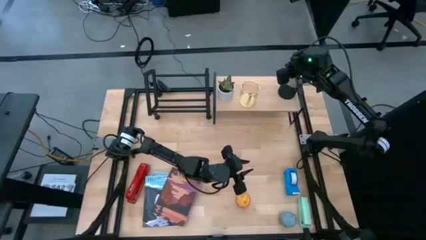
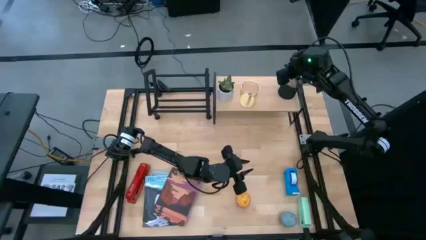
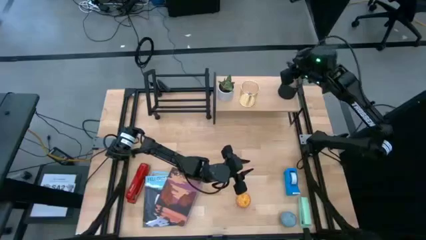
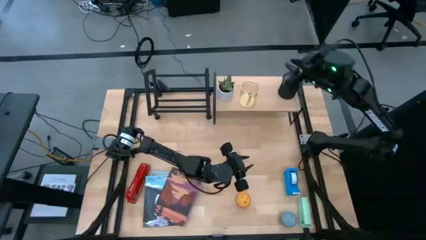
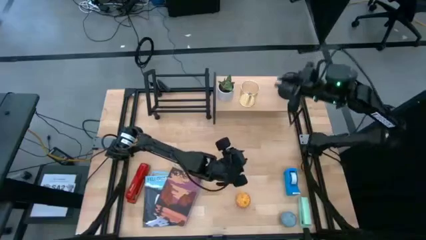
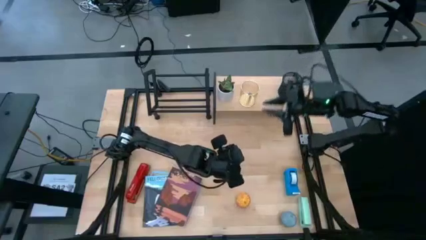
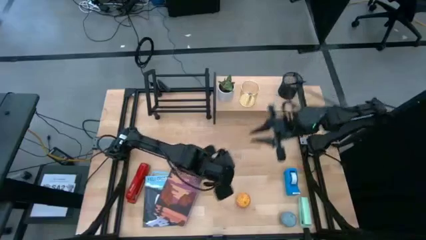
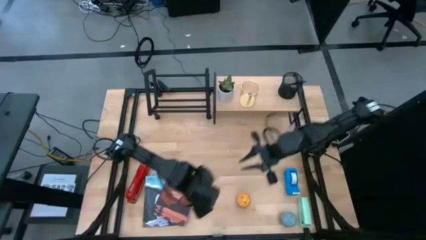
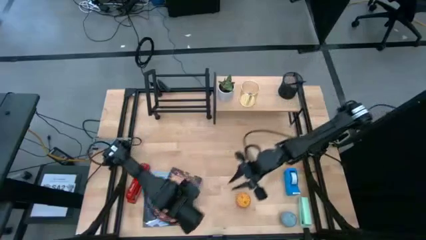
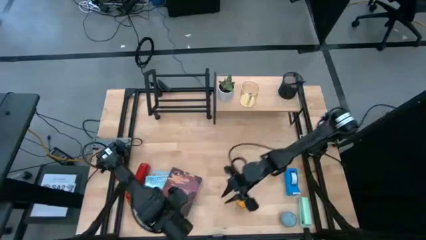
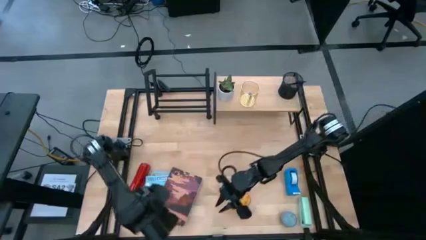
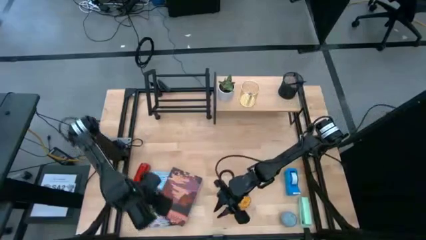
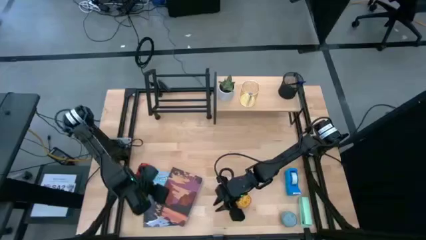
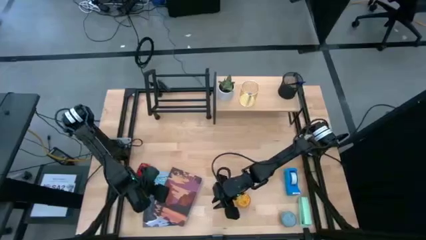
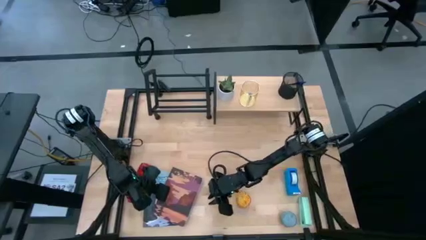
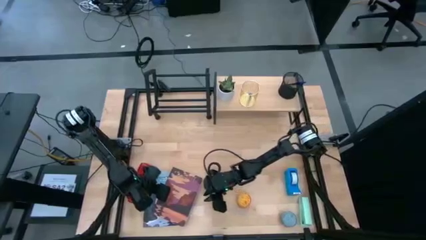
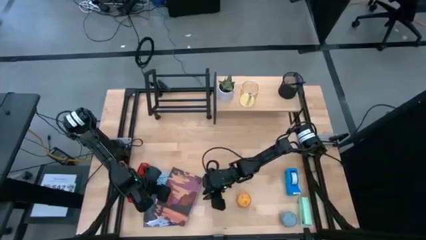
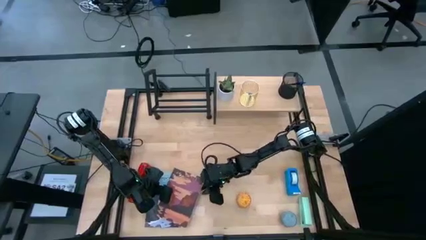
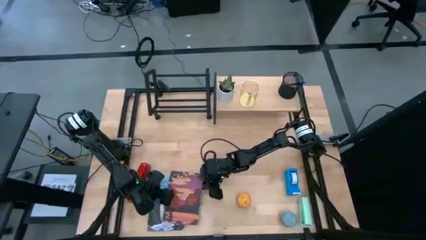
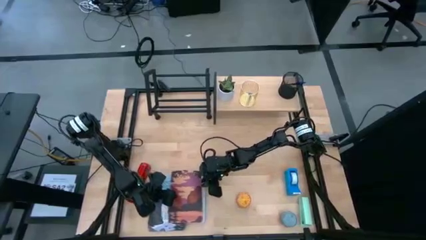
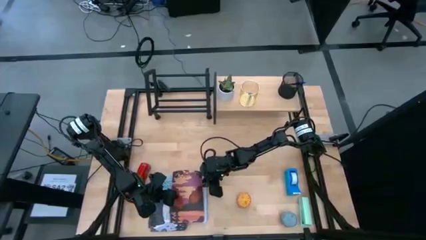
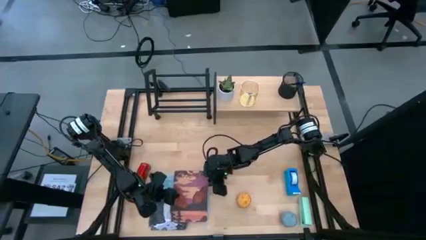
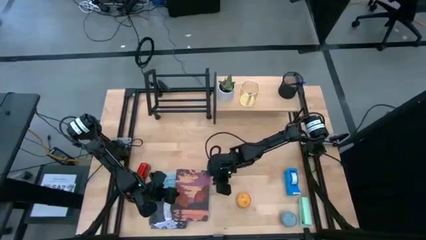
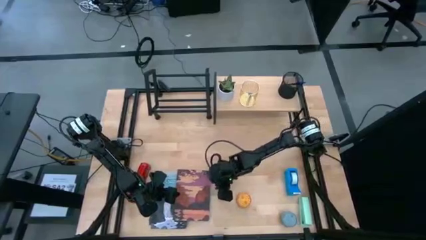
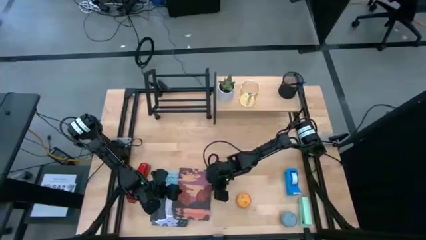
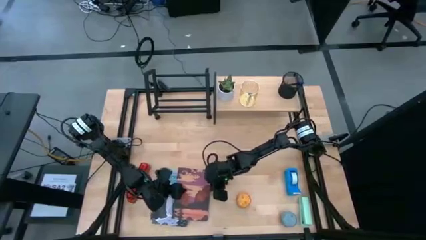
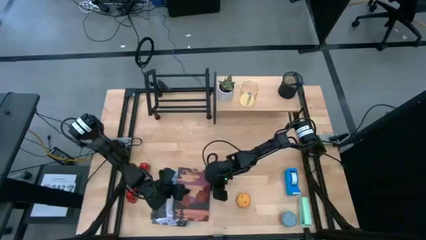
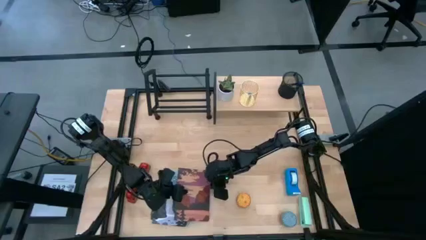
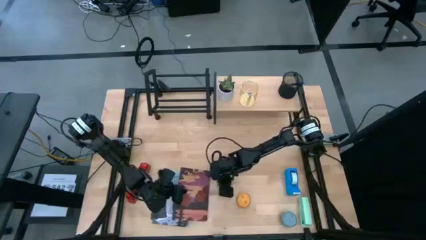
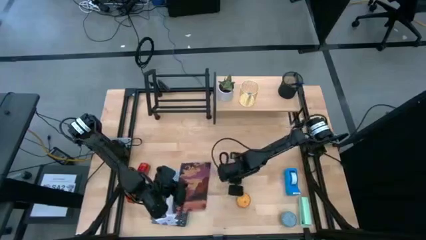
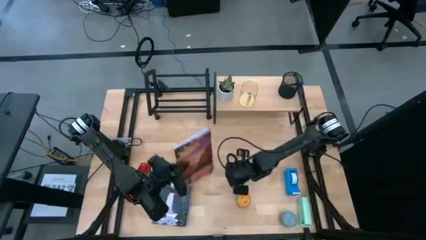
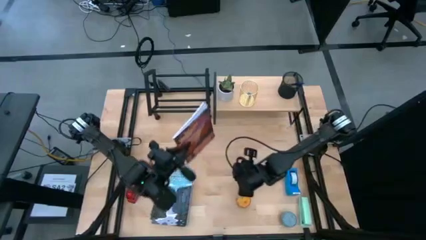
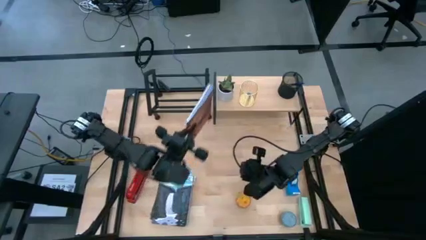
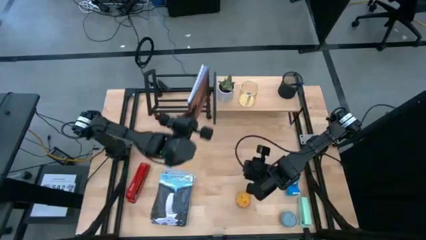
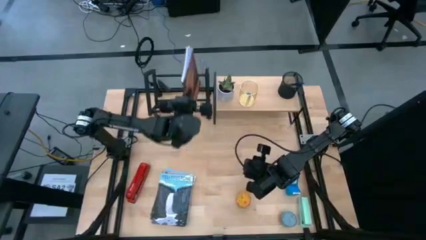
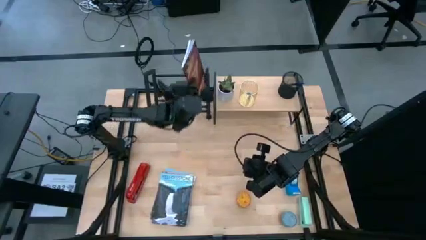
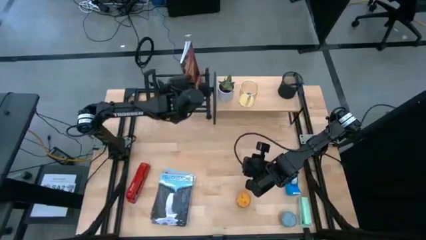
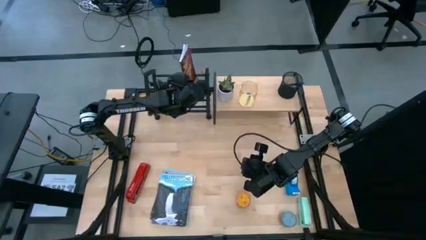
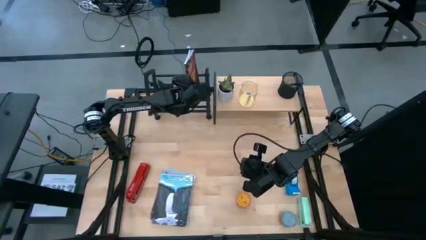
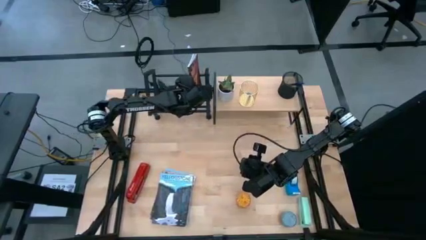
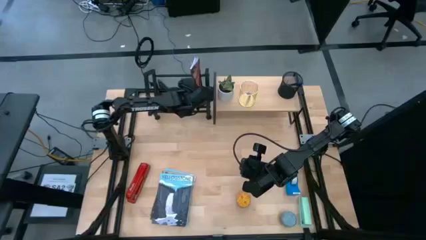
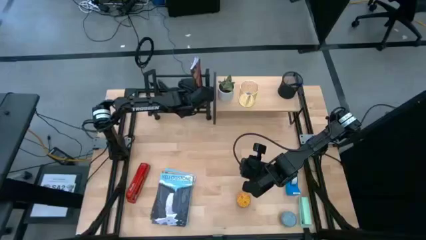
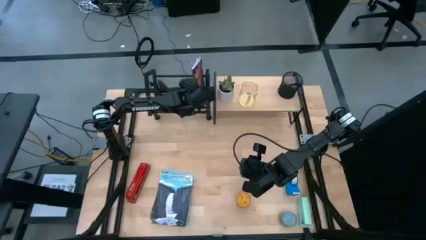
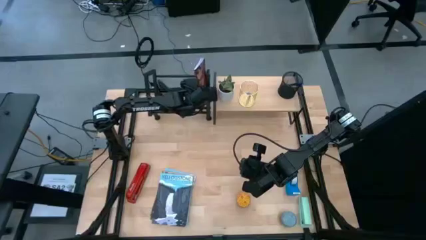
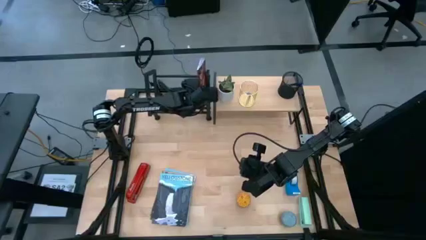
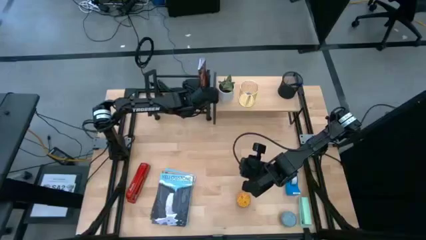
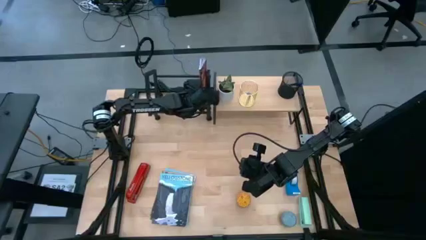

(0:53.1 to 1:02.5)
Task: Stock shelves
Put the brown book on the black book shelf

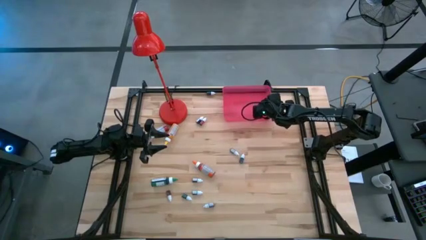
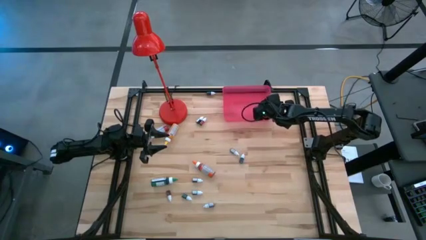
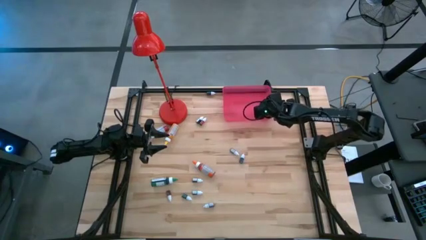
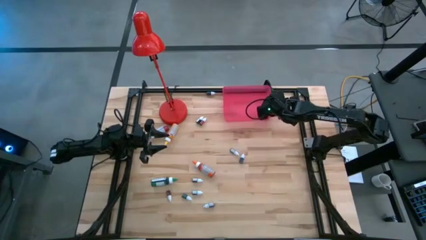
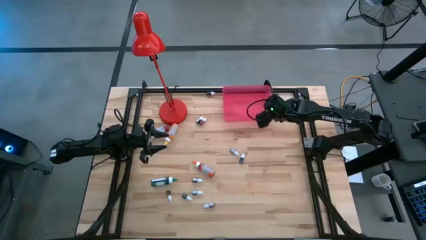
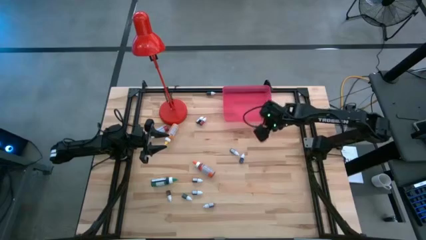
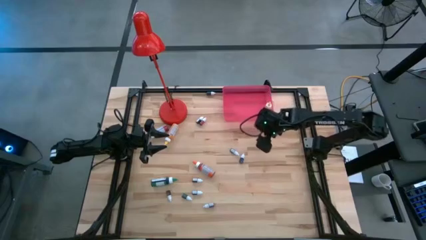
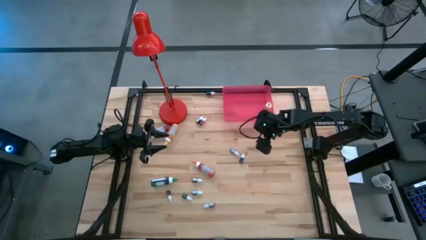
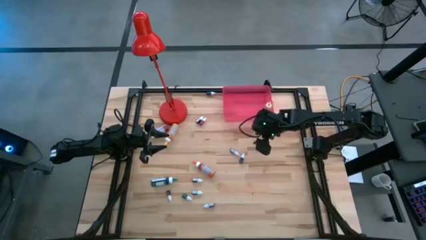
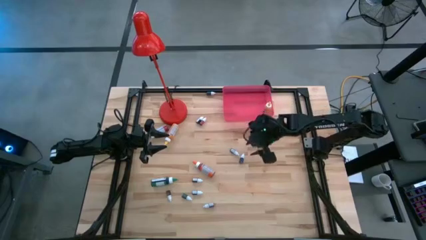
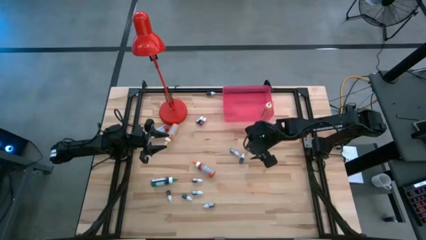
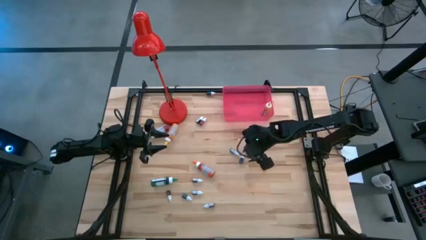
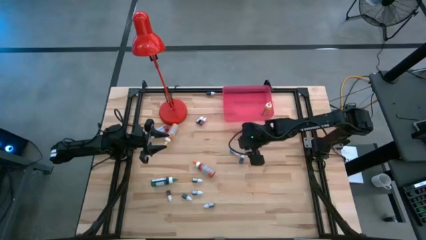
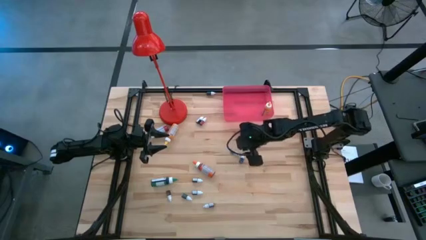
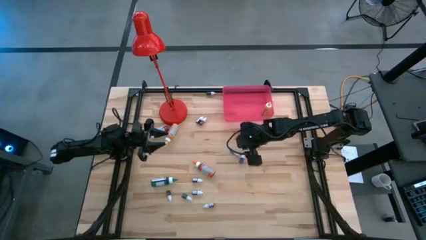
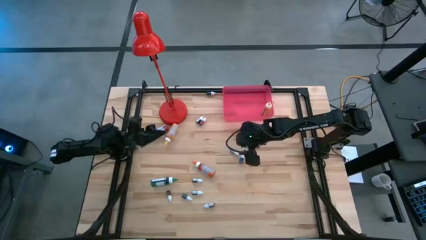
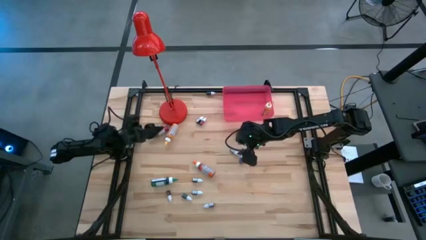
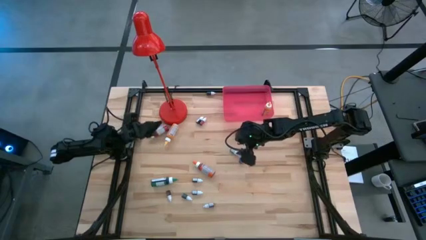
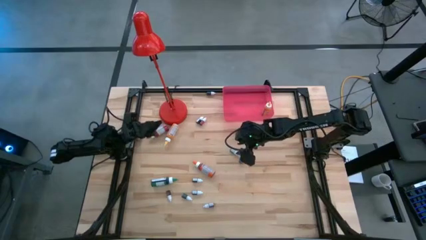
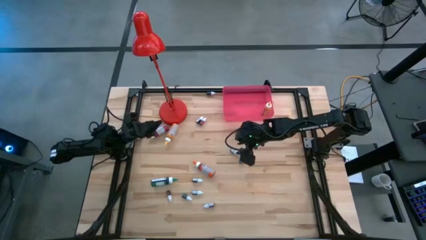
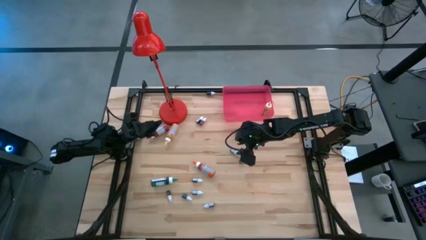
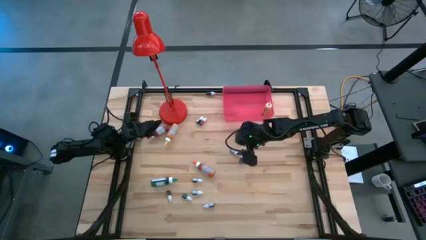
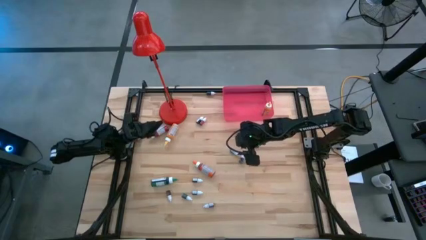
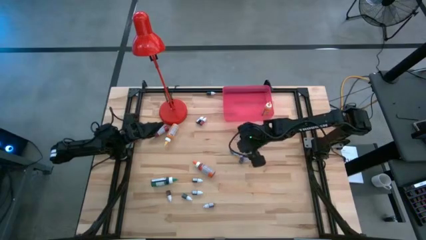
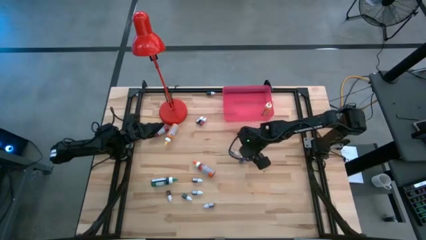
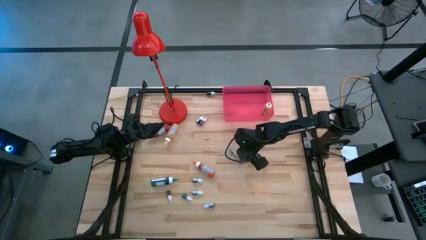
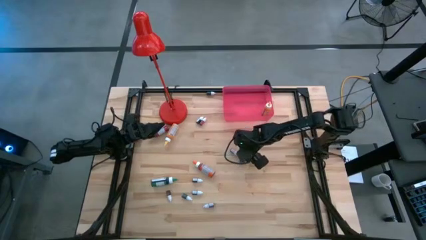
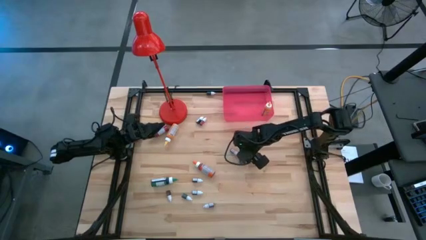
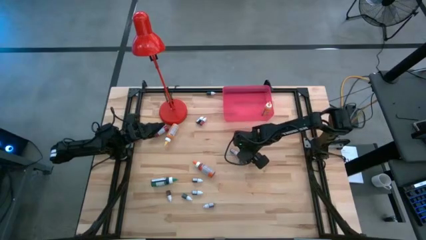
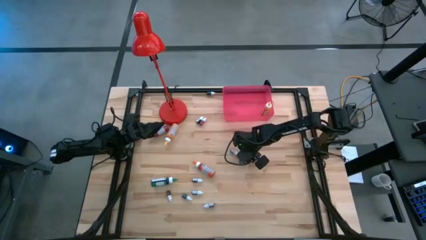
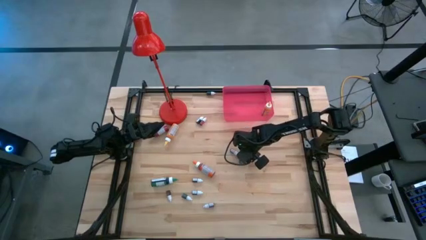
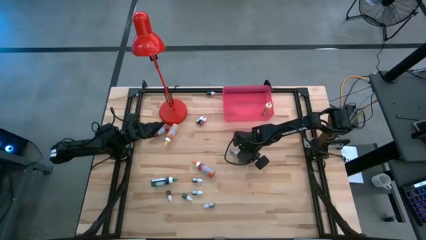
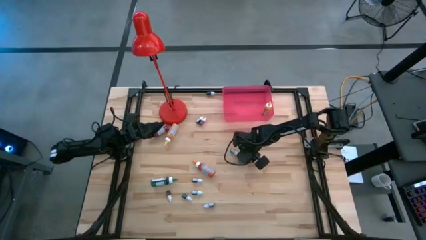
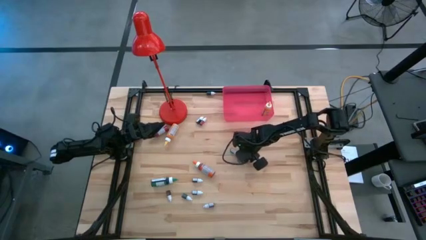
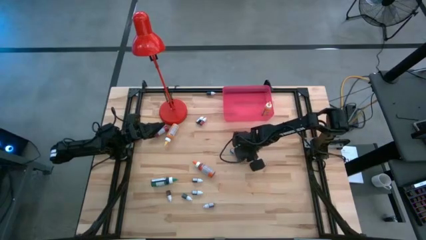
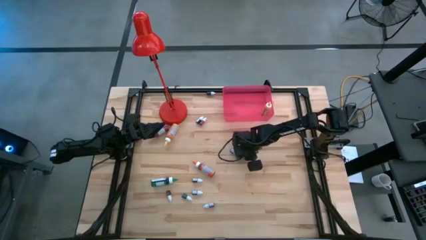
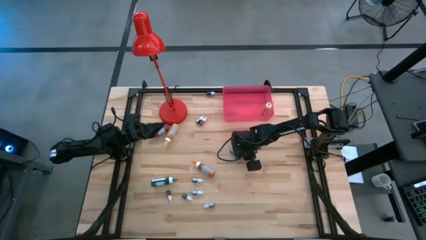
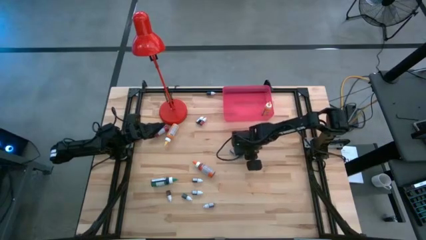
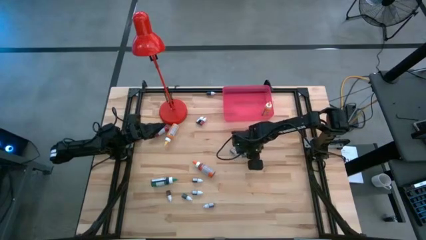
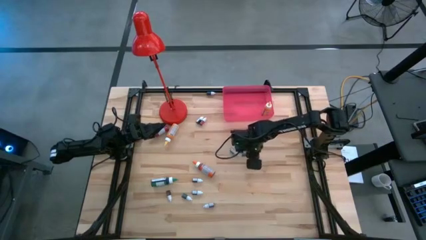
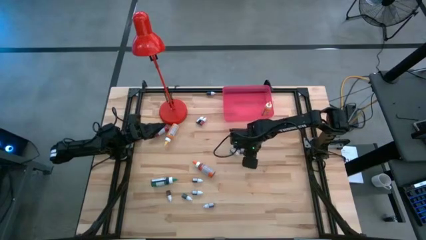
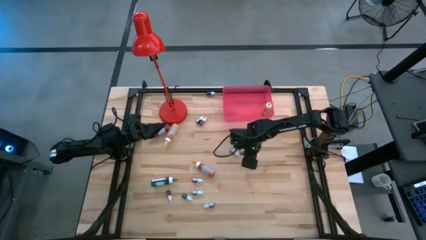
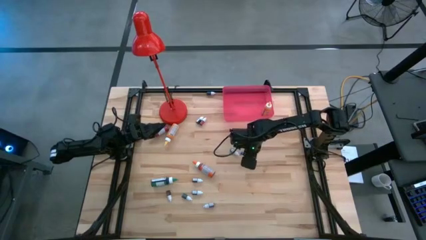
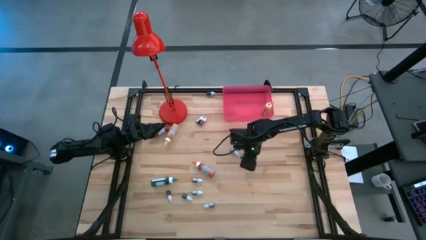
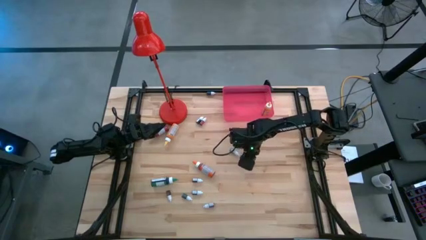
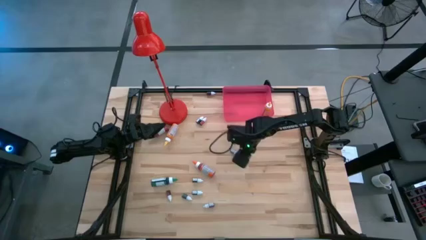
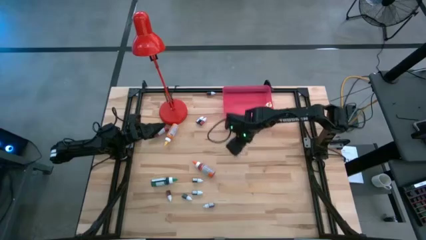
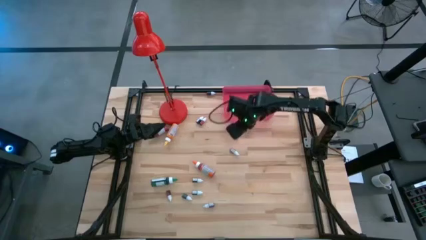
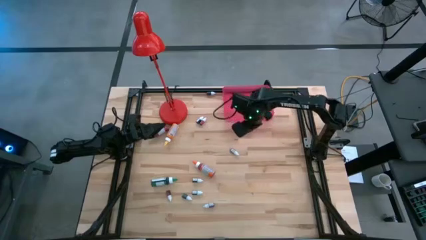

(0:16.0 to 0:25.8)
Task: Pick & Place food coloring
Put the small blue food coloring bottle into the red bin
